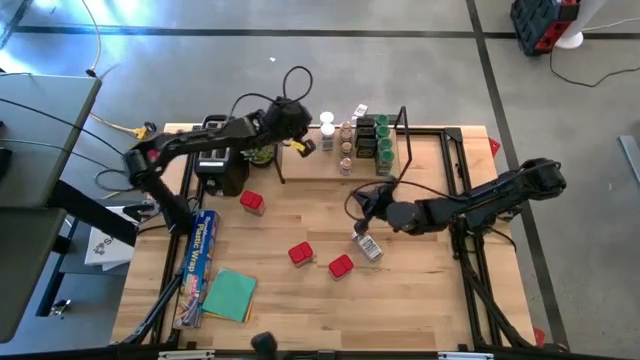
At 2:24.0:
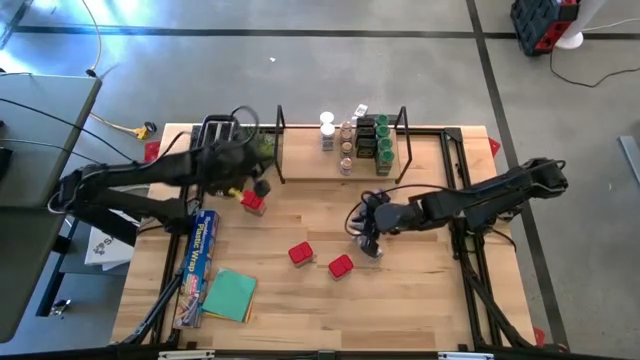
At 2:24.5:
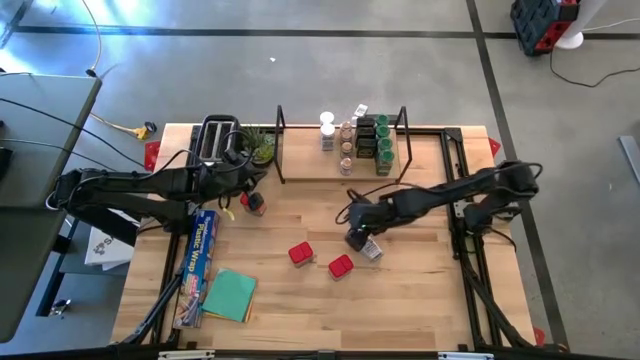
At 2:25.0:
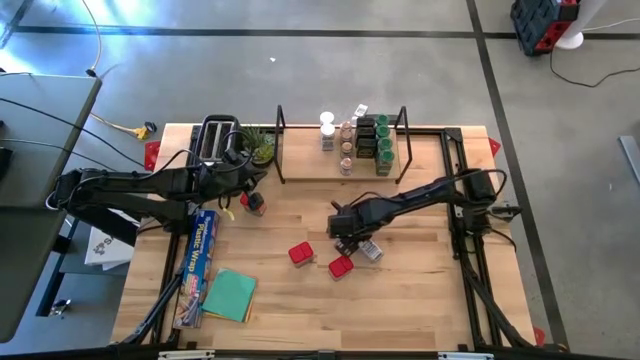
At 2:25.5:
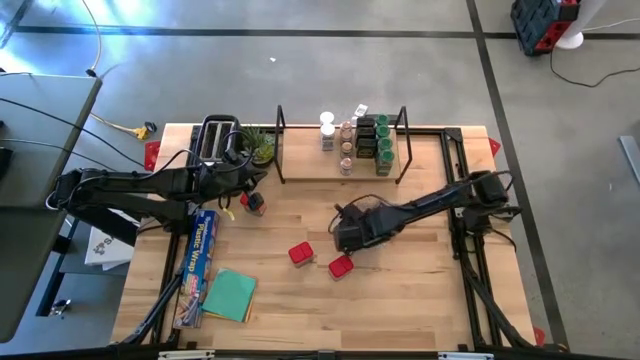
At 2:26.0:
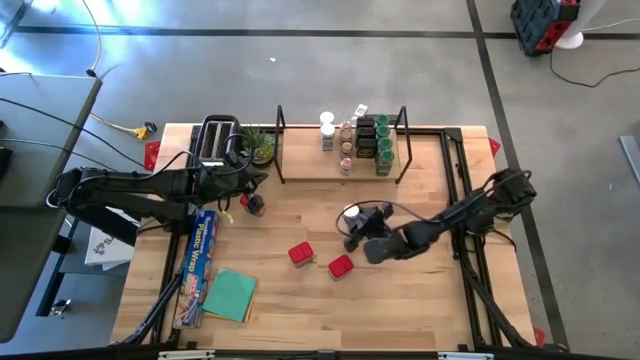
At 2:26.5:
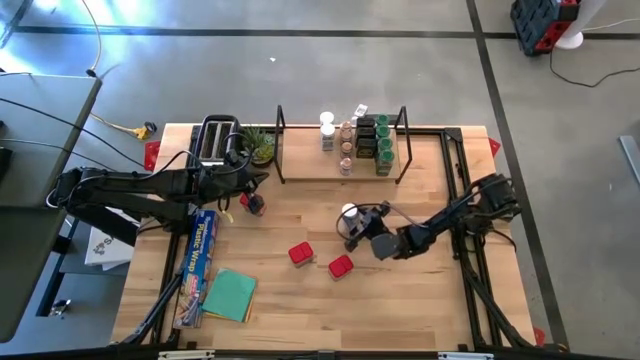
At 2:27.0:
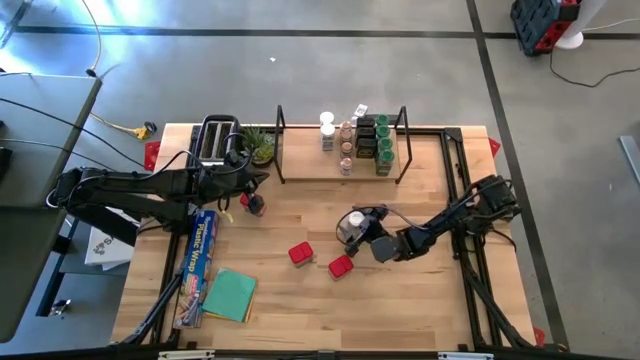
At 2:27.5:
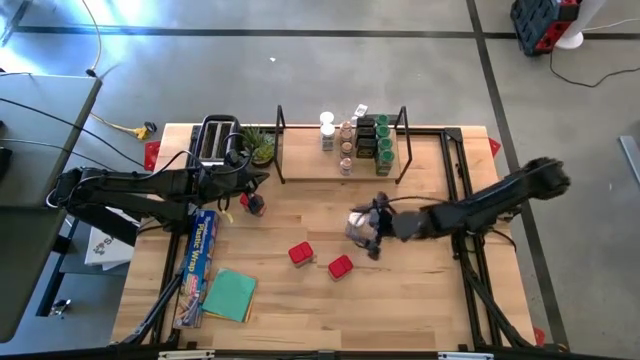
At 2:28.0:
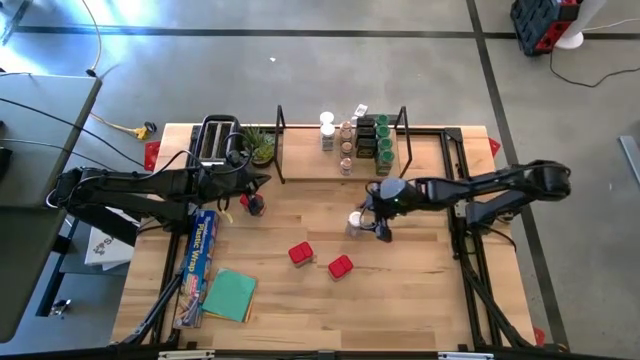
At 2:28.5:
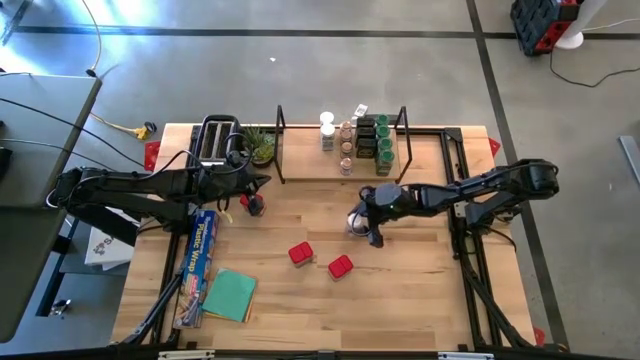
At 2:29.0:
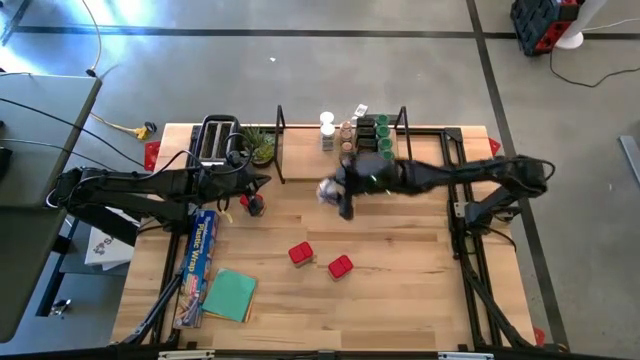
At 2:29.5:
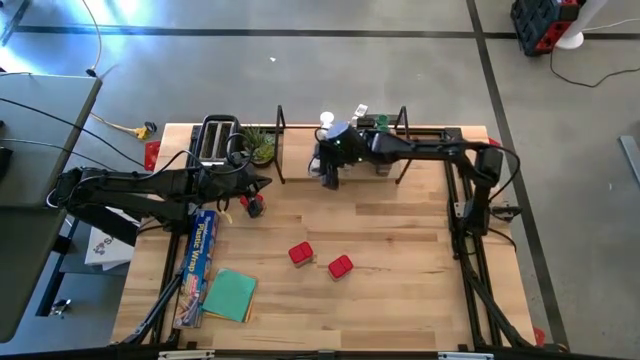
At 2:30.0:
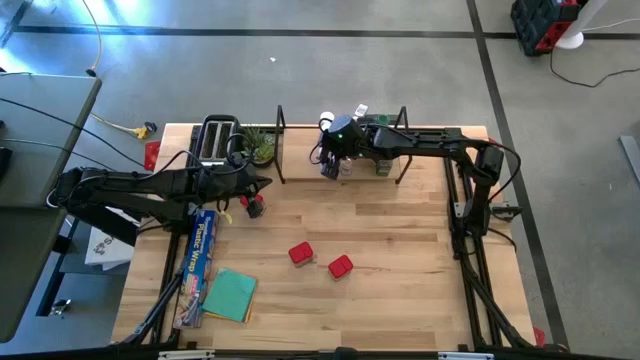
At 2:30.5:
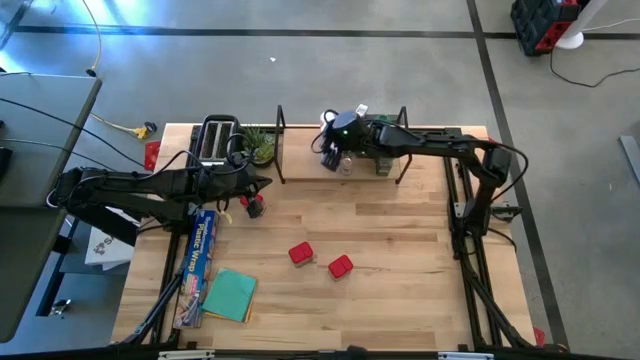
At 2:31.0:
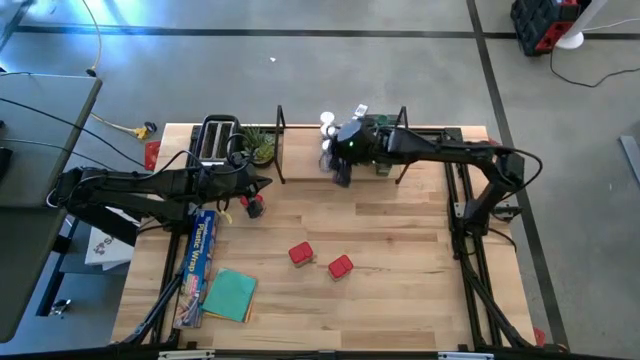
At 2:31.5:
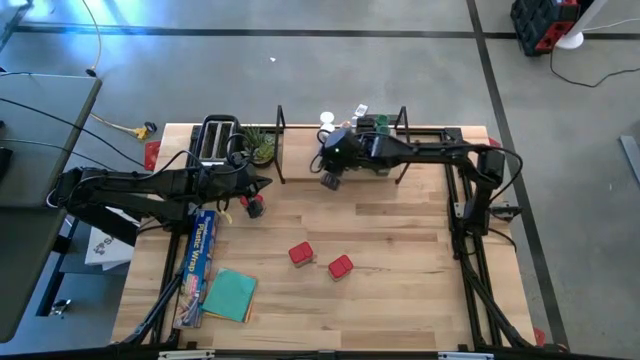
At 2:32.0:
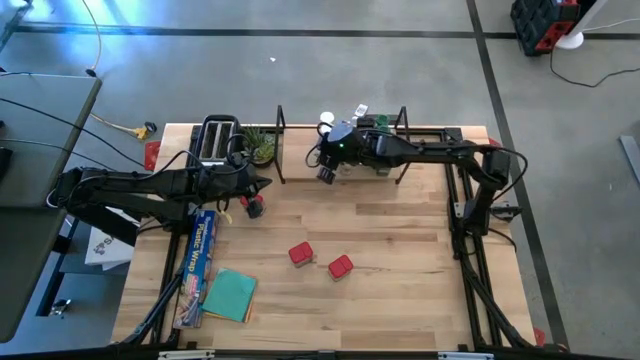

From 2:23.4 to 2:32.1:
Task: Shelf spices
Put the white seasoning bottle on the shelf aligned with the other white seasoning bottles

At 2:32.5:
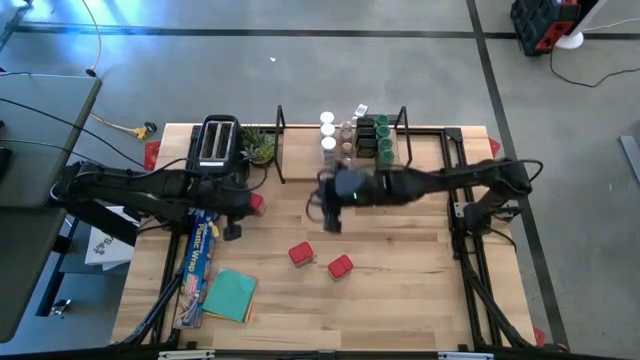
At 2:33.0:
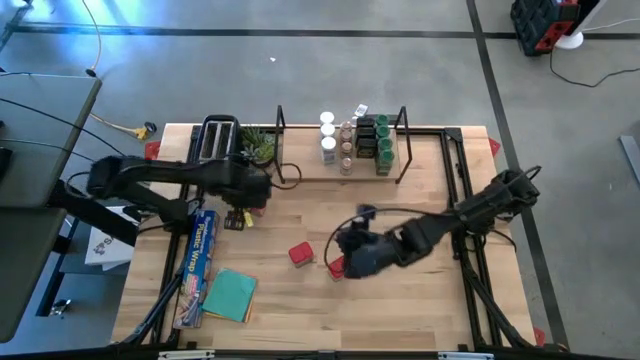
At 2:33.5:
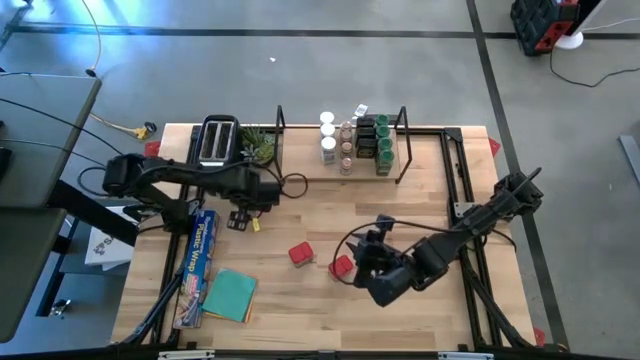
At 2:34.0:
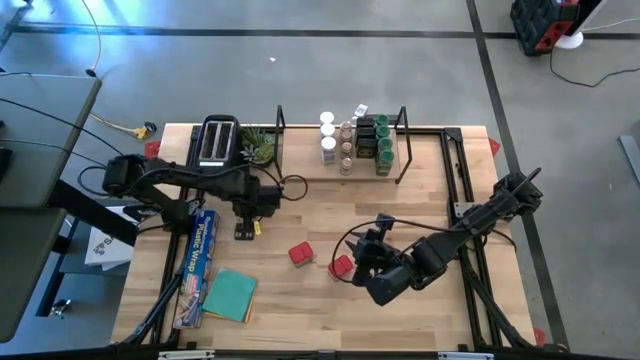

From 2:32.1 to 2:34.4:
Move the top left red seasoning can to the middle left of the table

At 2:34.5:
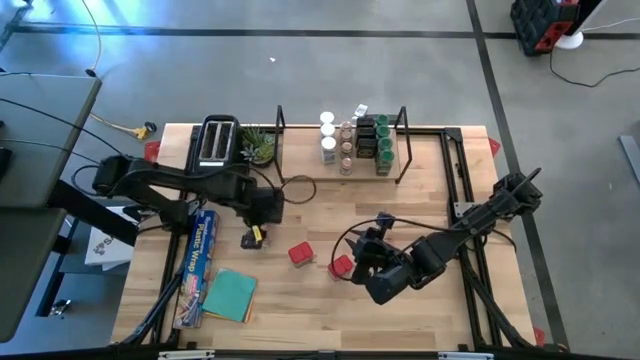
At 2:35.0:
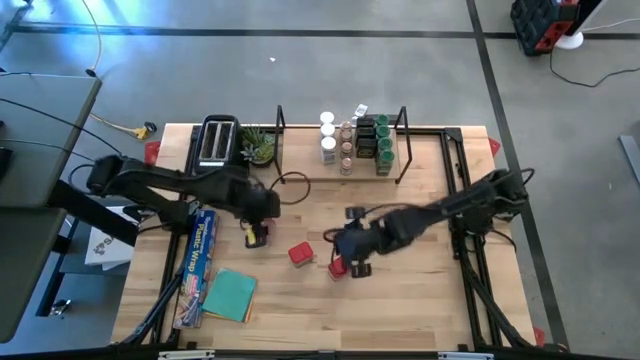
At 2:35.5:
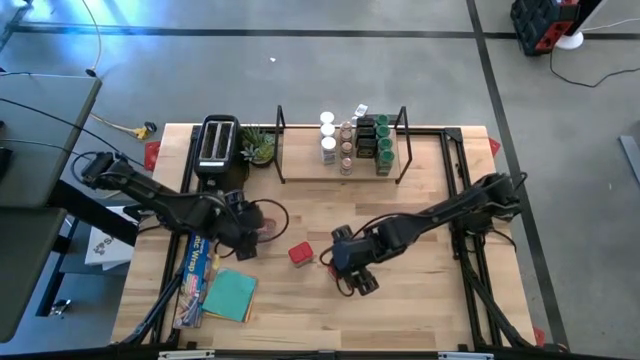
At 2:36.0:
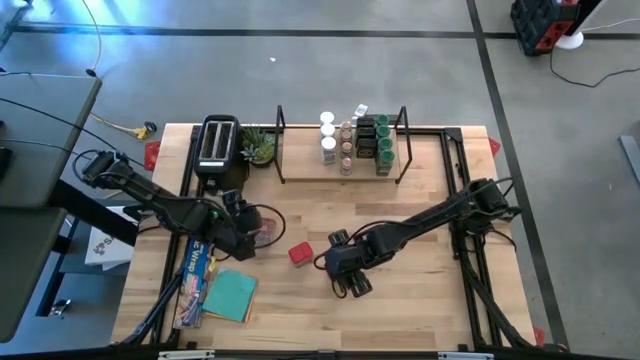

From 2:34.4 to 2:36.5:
Put the bottom right red seasoning can on the shelf

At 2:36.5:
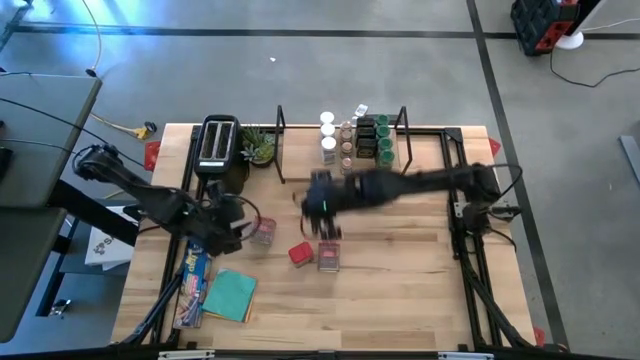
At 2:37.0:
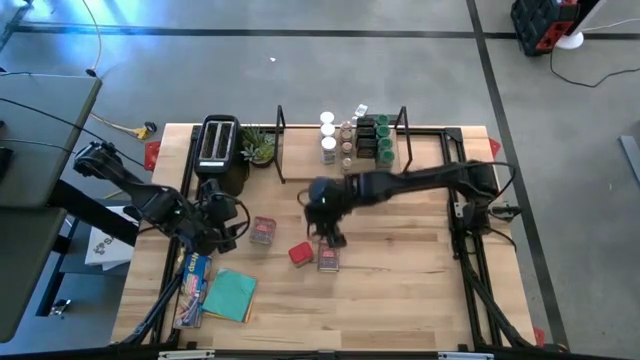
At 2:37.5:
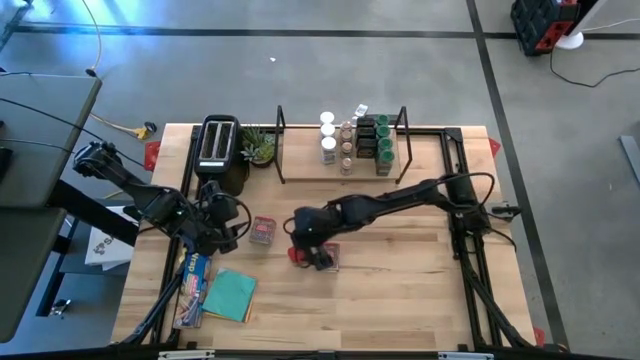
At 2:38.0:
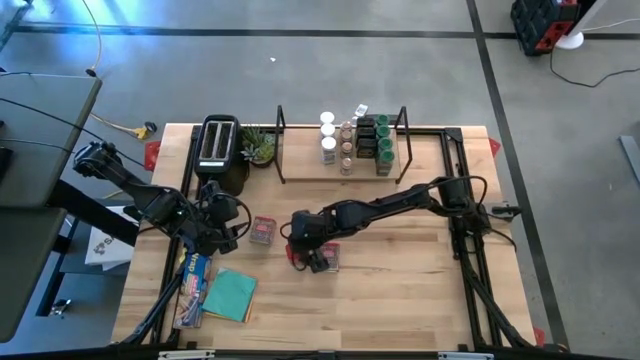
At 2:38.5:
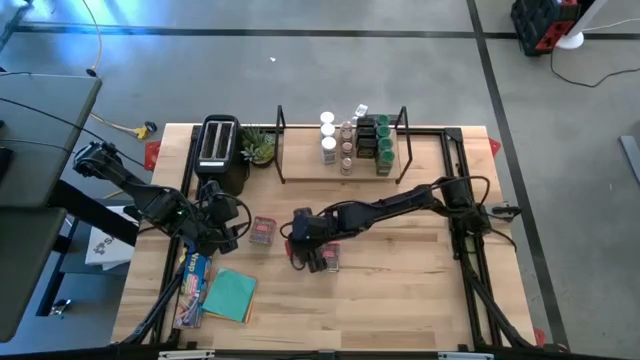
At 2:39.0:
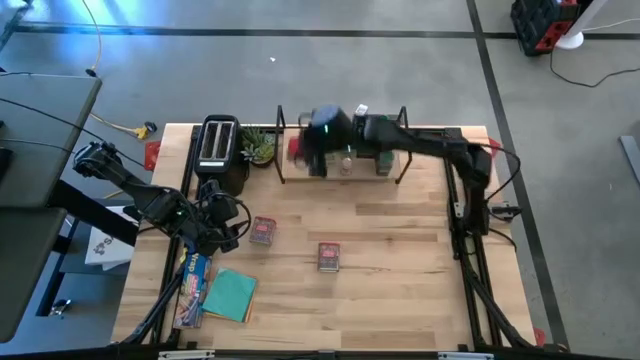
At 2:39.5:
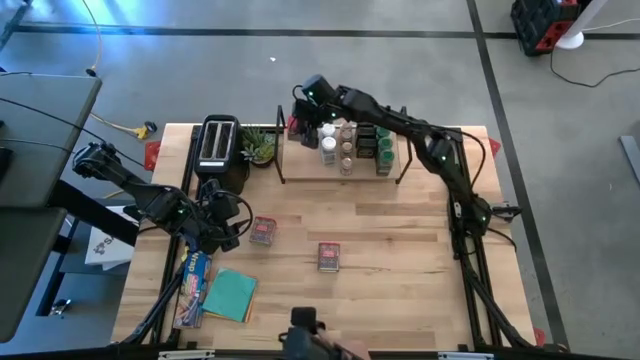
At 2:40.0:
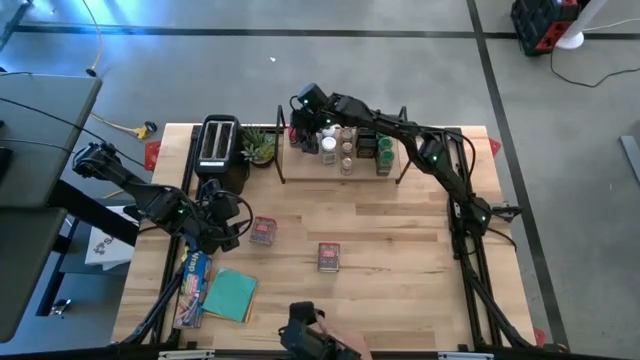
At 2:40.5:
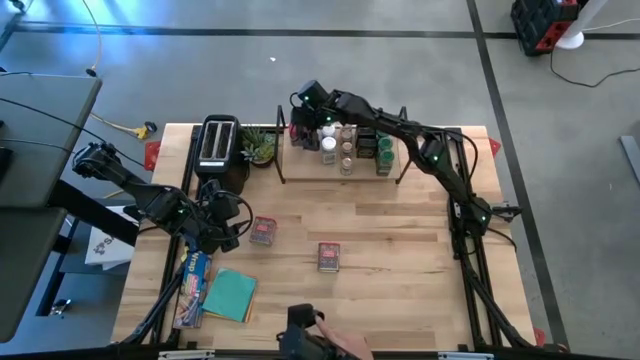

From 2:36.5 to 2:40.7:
Put the center red seasoning can on the shelf

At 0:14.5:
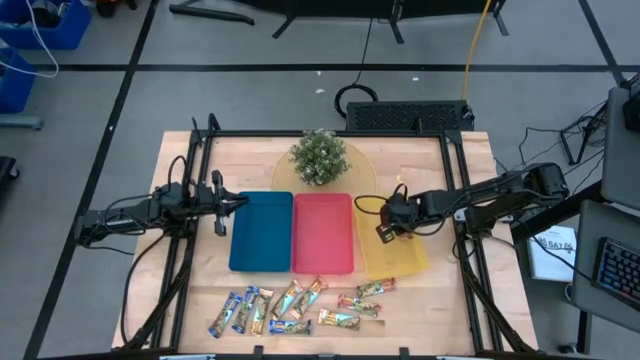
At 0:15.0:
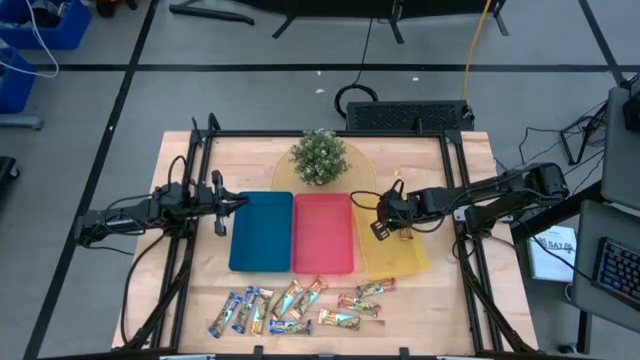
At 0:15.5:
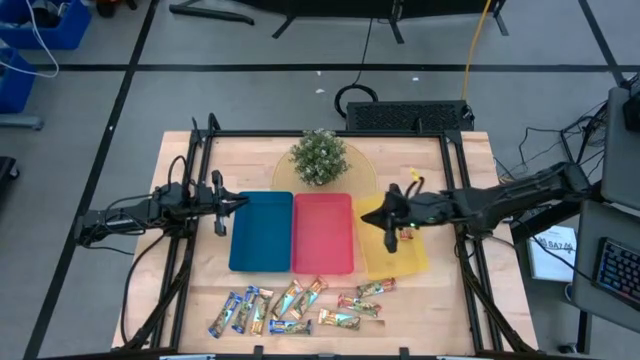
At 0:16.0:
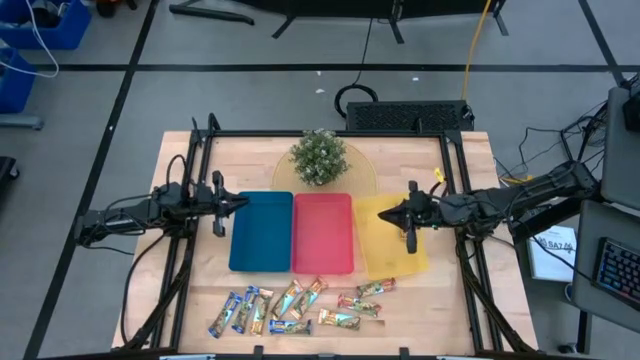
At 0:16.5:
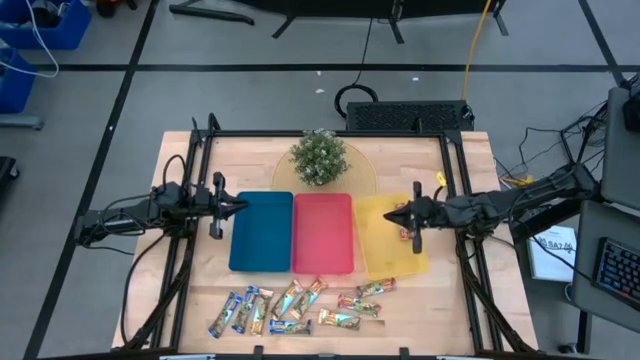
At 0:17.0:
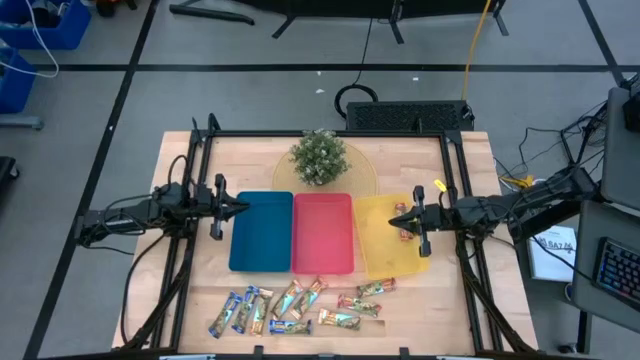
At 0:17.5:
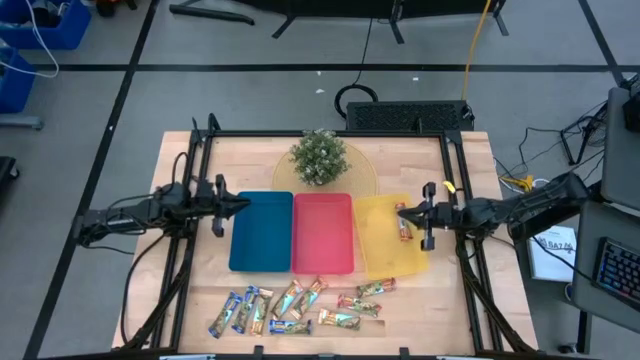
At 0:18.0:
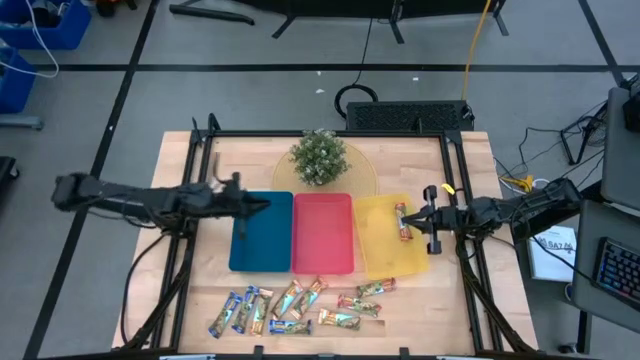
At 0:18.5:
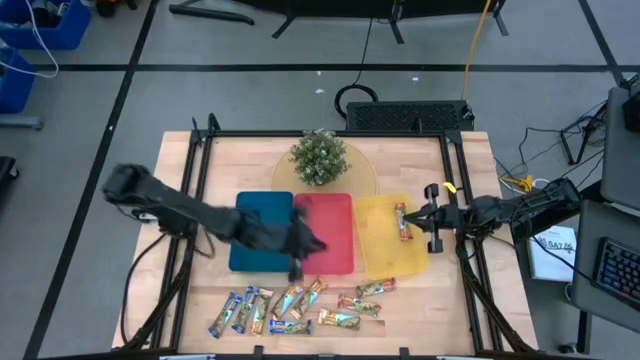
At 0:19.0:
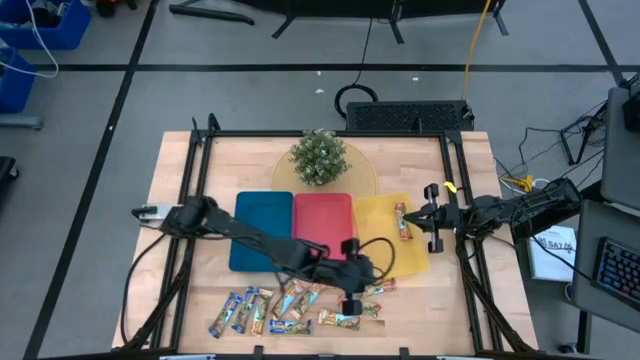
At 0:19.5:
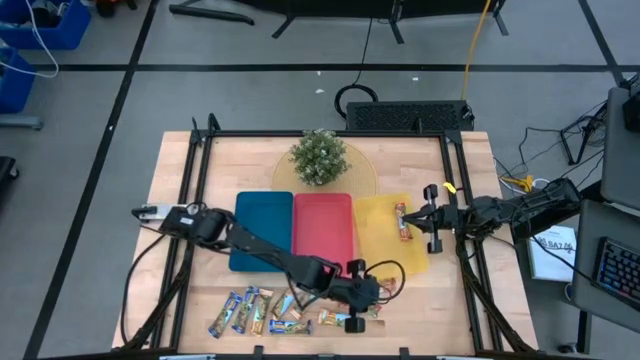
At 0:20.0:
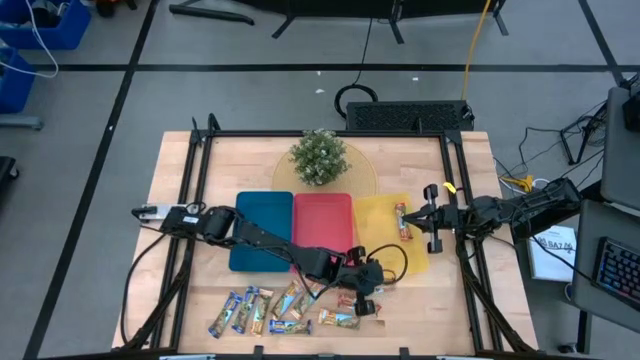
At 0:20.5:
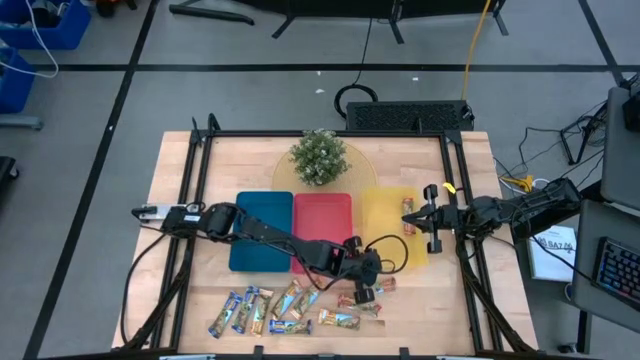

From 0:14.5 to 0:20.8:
Task: Pick and place Granola Bars by type
Adjust the yellow bin on the table
